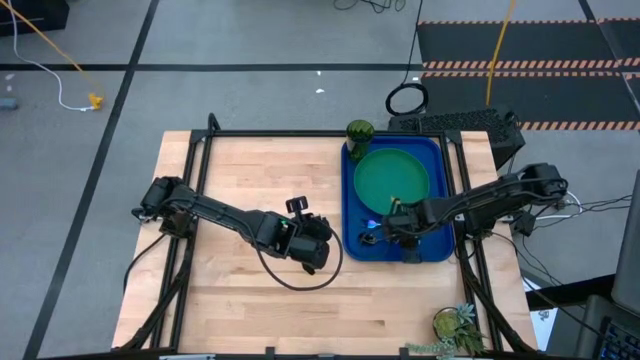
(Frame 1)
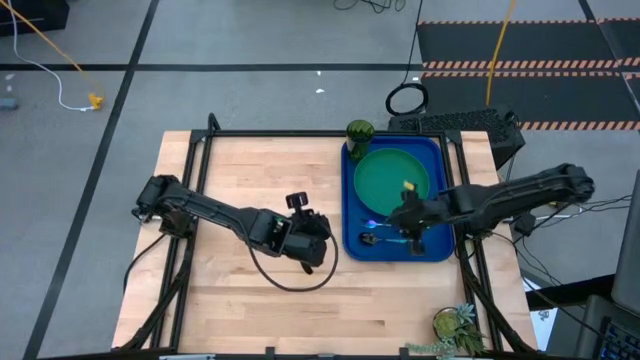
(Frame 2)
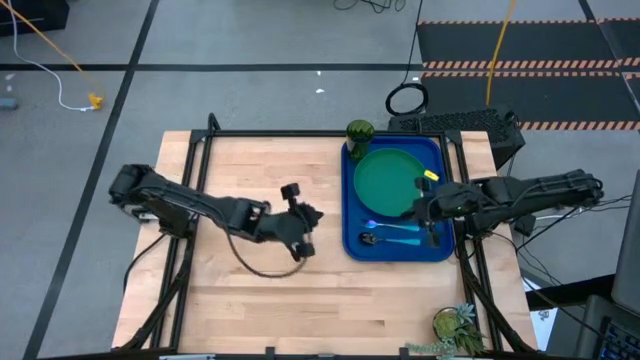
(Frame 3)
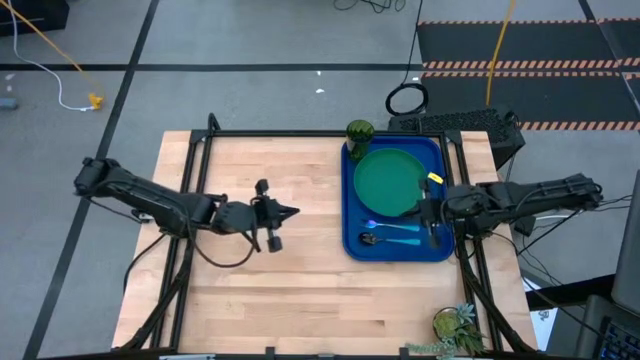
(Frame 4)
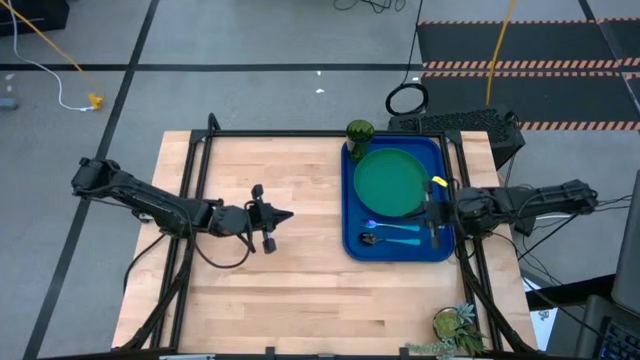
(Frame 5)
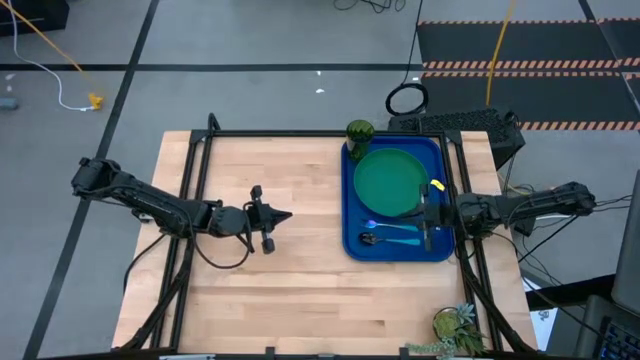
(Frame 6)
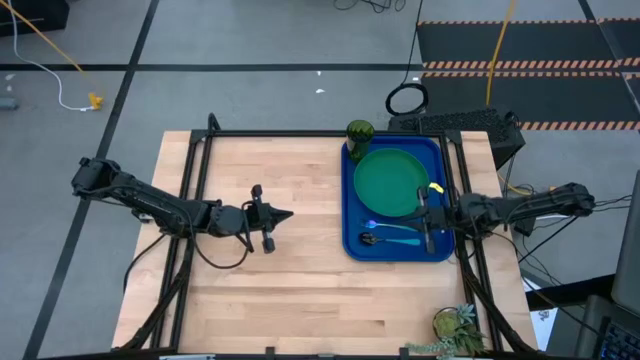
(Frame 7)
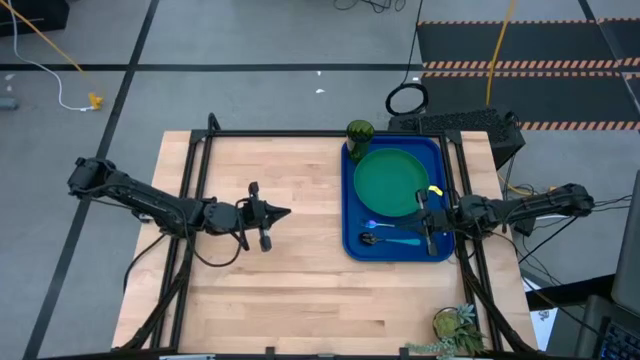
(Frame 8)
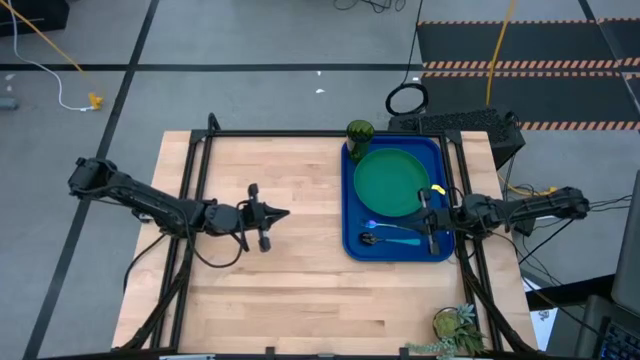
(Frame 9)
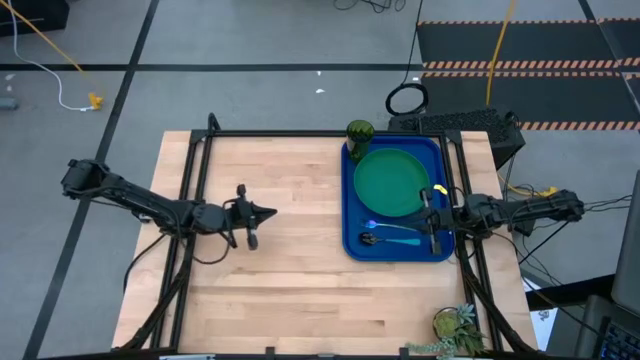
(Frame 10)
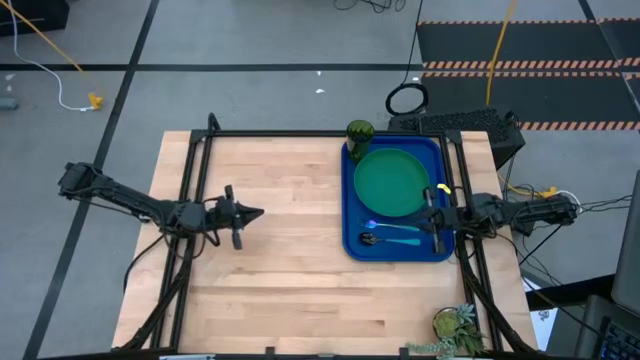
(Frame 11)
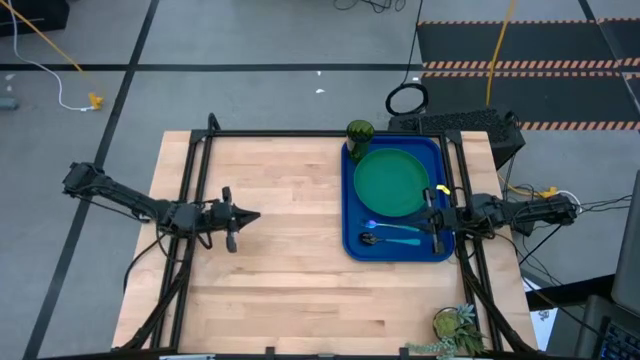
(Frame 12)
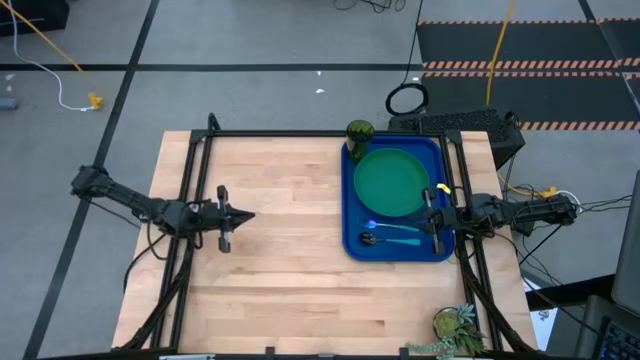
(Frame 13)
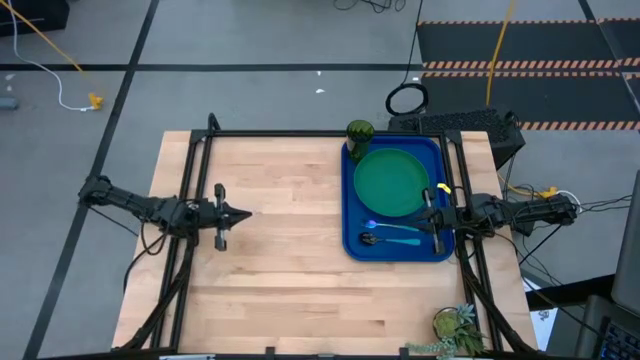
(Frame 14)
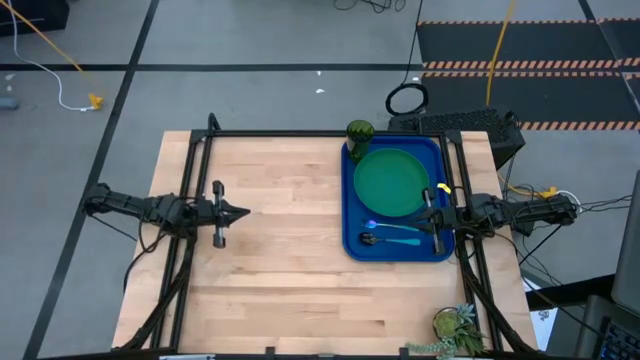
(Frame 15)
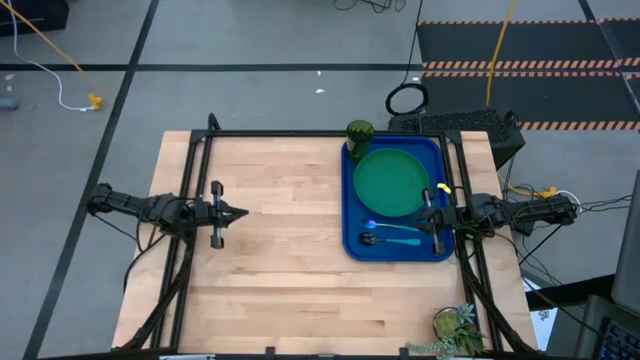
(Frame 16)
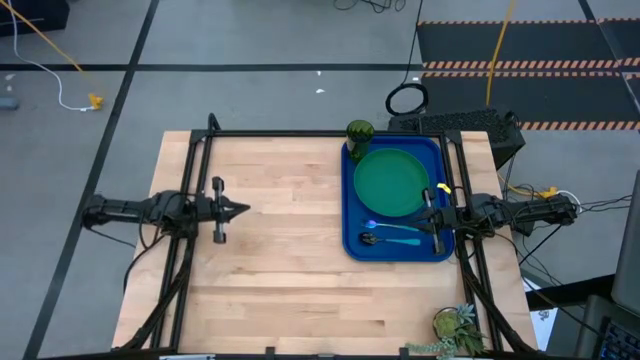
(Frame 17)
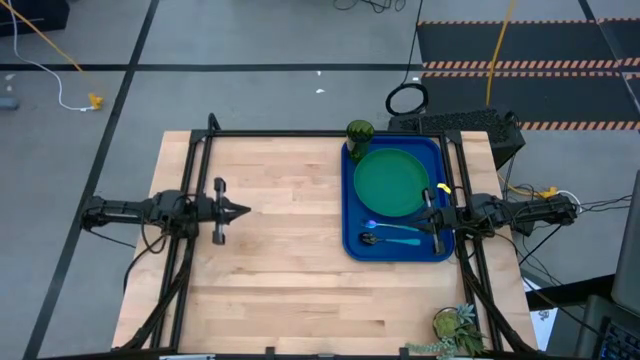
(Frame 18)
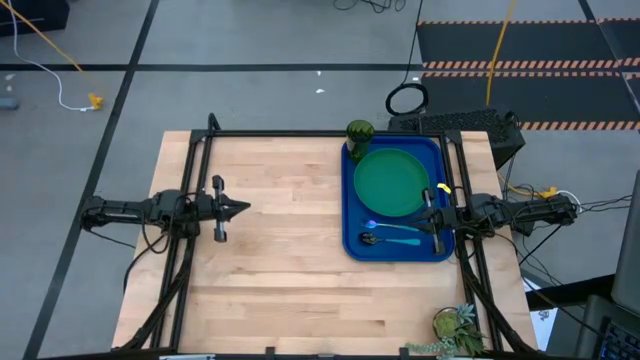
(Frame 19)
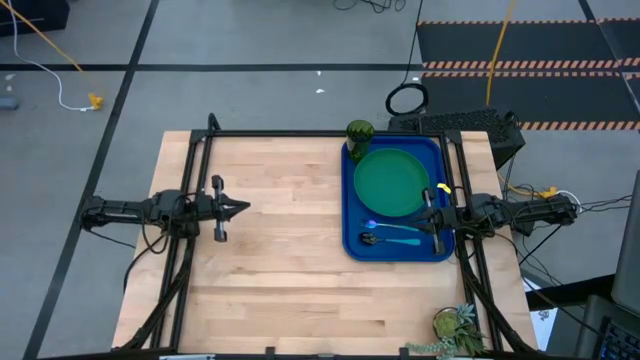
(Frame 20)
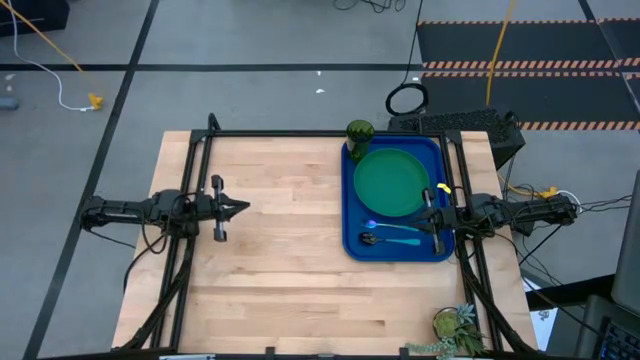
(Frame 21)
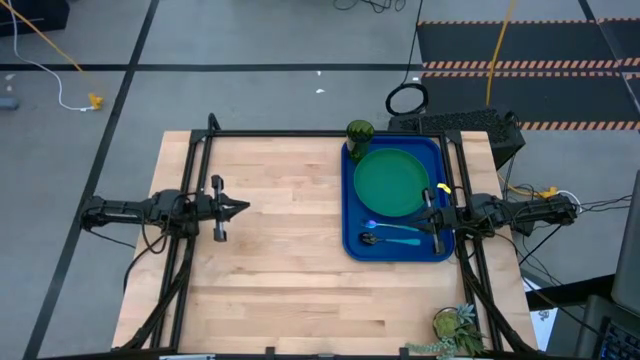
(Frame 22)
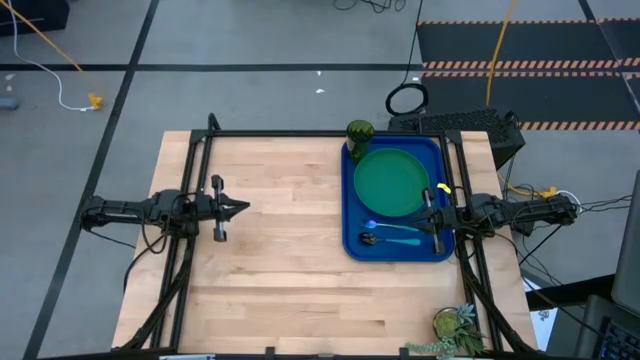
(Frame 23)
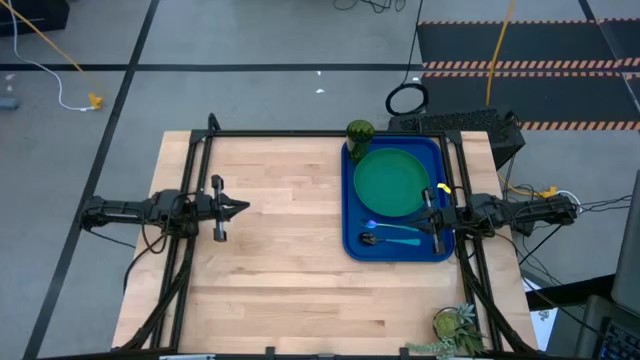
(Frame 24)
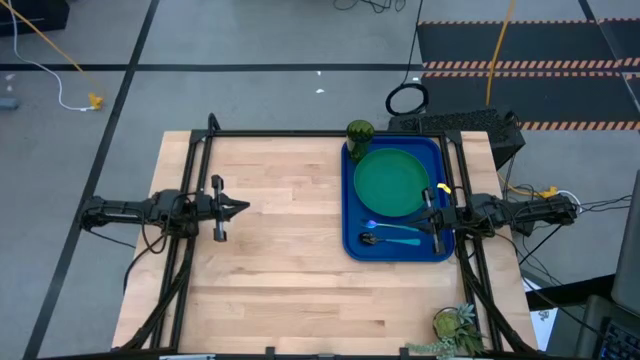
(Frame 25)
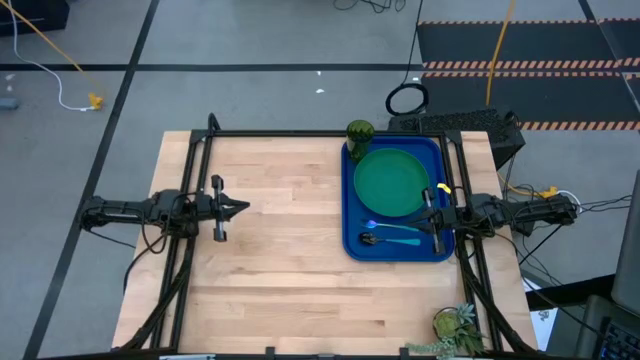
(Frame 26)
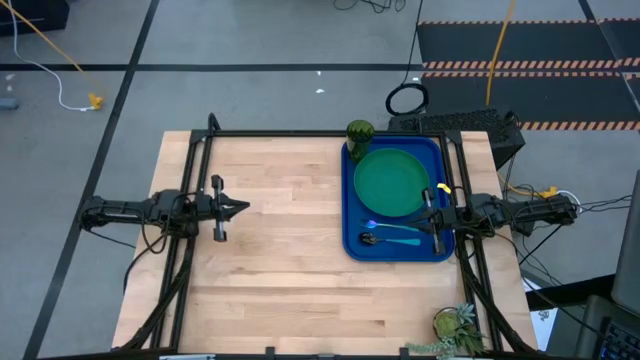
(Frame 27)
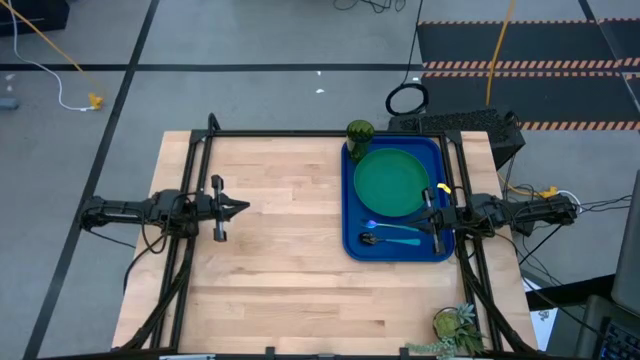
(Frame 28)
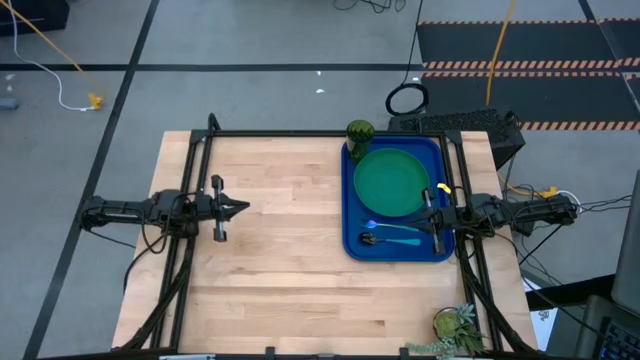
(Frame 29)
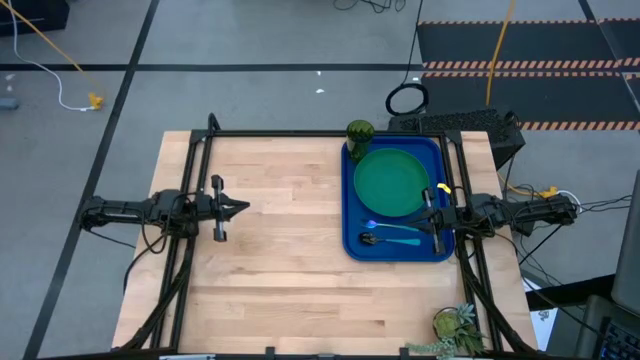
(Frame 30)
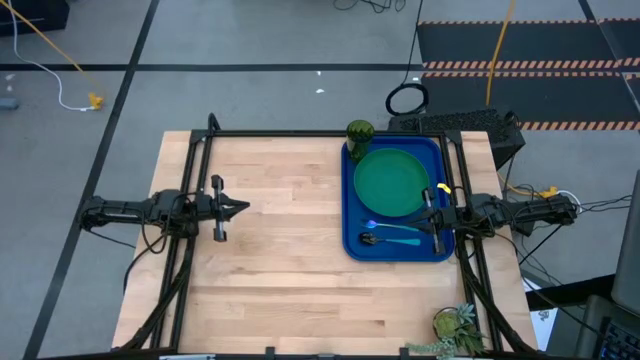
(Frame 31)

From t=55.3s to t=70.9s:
Task: Pick and place plate/cup/fork/spoon on tray
Return to Home Position

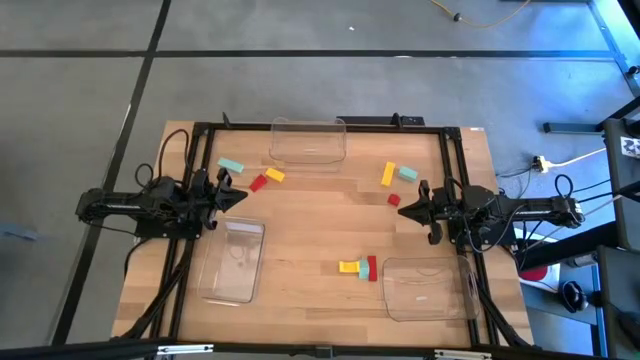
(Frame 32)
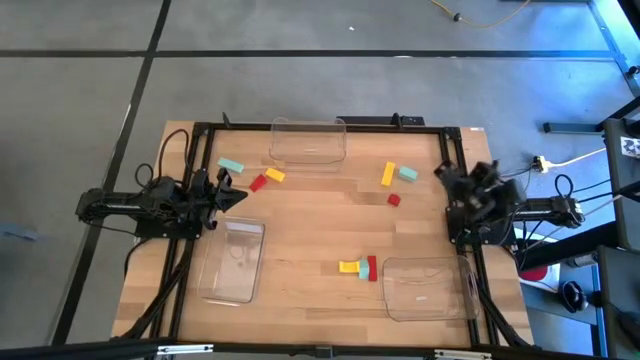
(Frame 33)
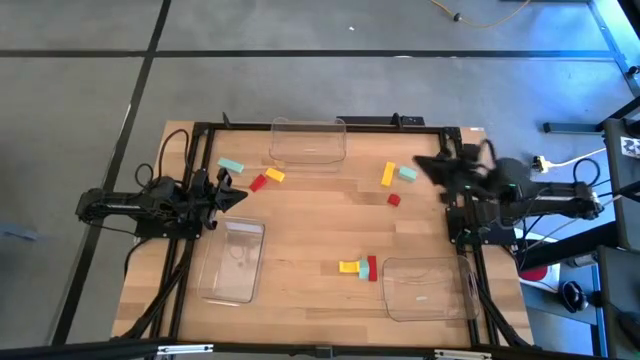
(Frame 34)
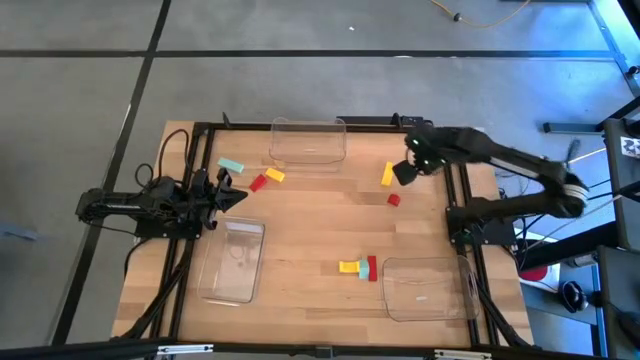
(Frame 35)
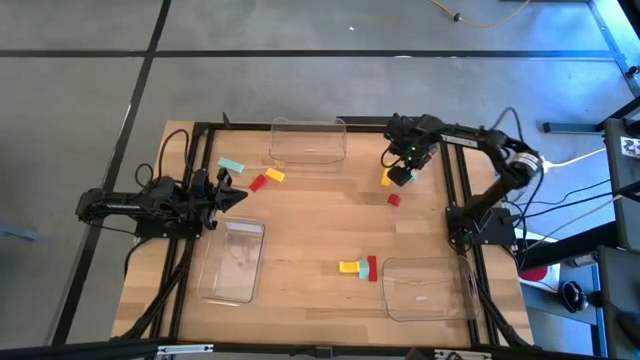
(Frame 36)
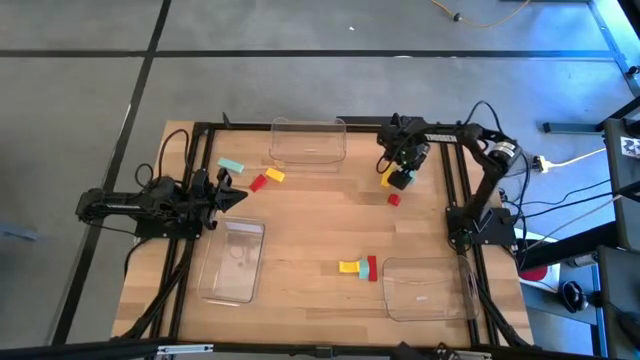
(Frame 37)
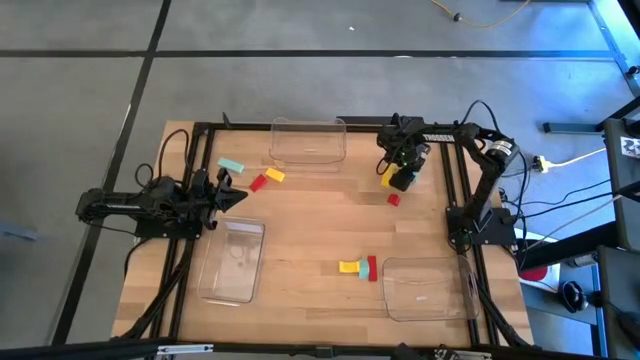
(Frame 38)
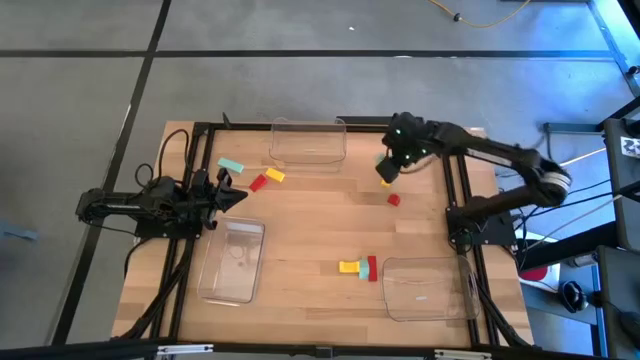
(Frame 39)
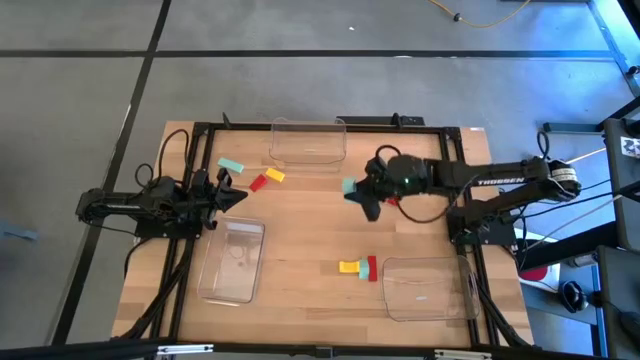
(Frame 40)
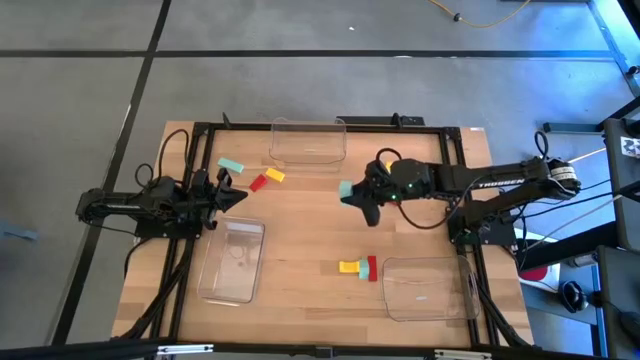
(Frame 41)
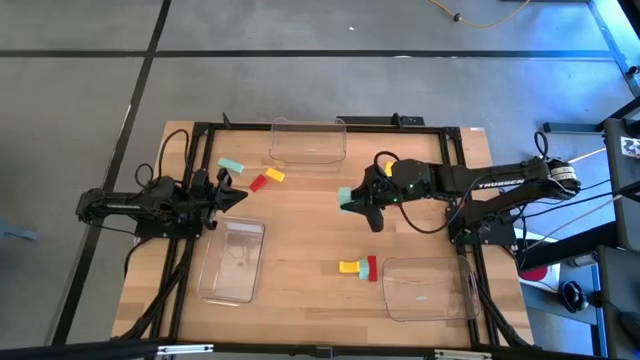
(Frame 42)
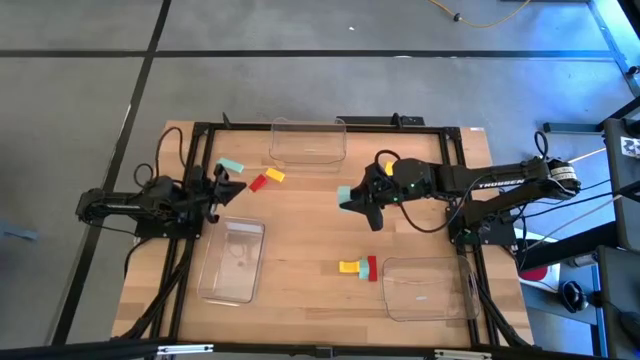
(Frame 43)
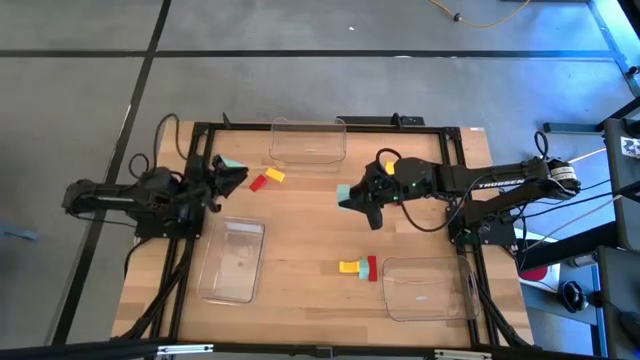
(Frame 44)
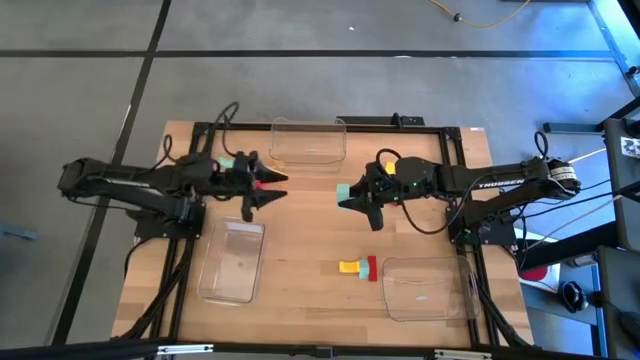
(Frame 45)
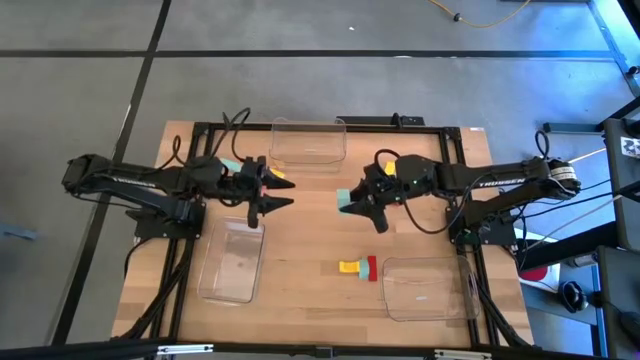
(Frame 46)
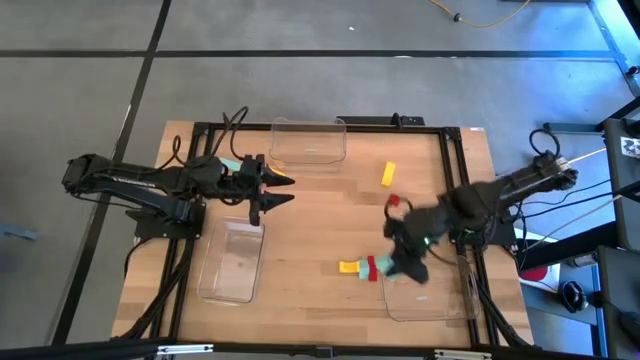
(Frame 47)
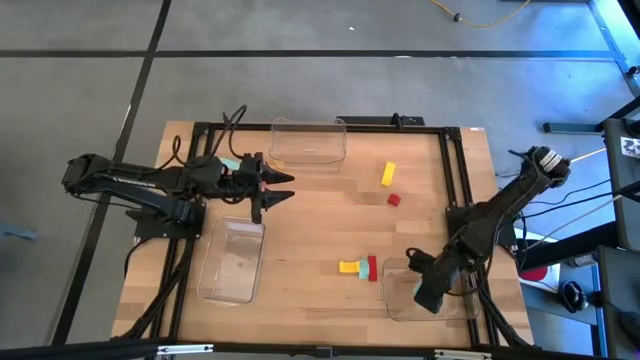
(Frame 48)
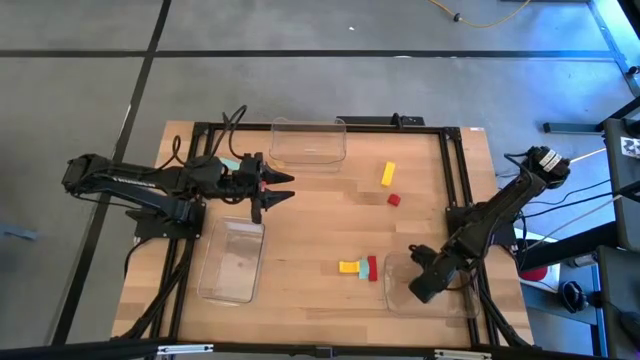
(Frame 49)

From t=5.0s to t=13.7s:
Task: Sort & place blocks by color
Put the top right light blue block in the right transparent bin
